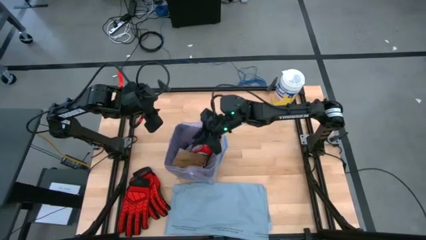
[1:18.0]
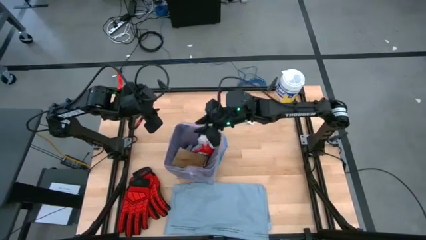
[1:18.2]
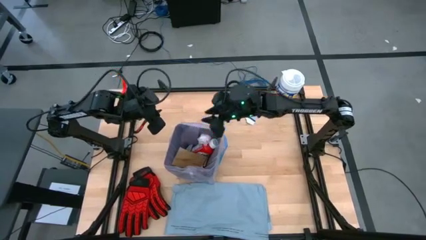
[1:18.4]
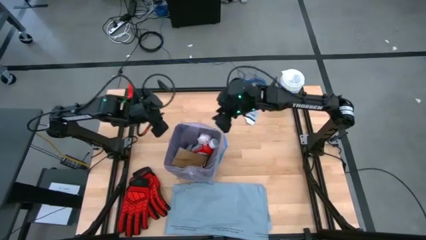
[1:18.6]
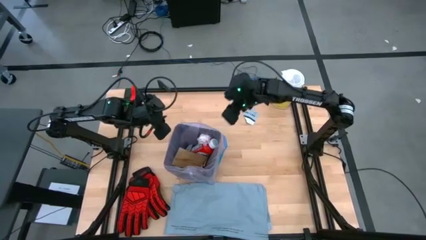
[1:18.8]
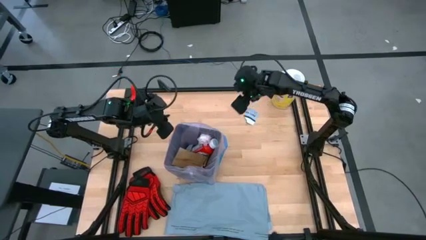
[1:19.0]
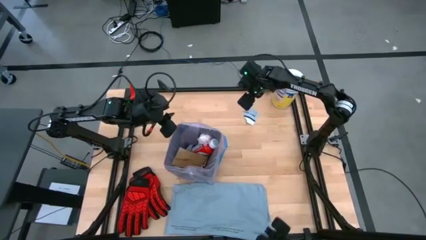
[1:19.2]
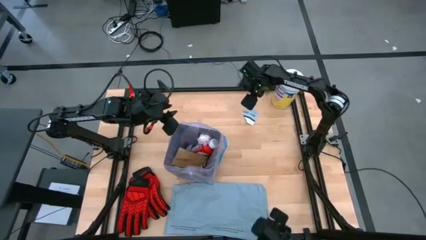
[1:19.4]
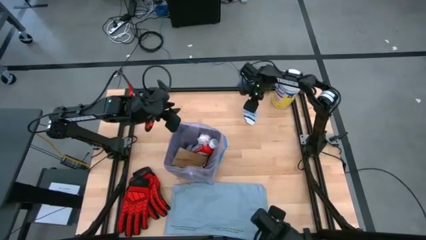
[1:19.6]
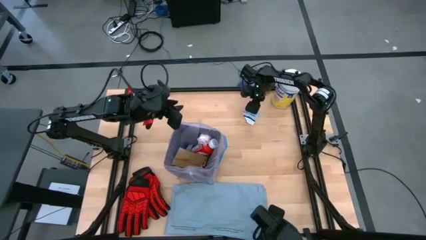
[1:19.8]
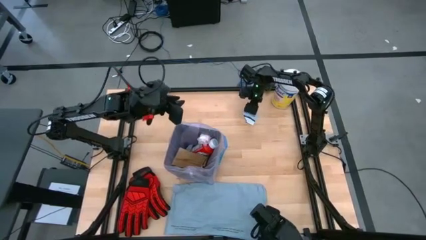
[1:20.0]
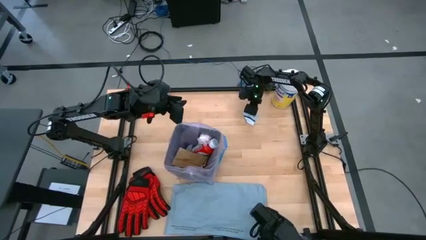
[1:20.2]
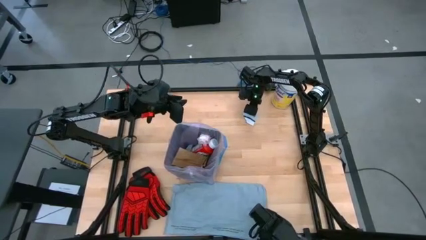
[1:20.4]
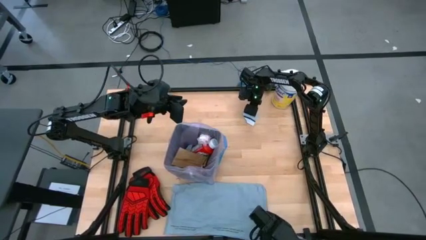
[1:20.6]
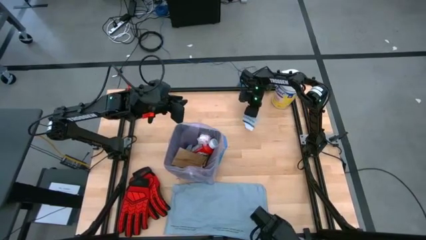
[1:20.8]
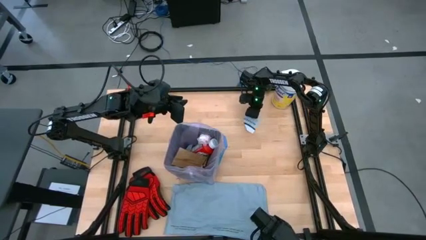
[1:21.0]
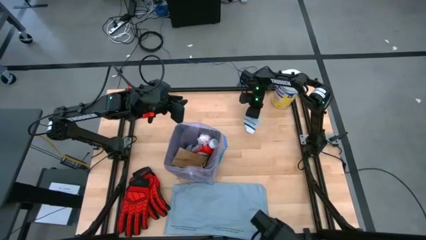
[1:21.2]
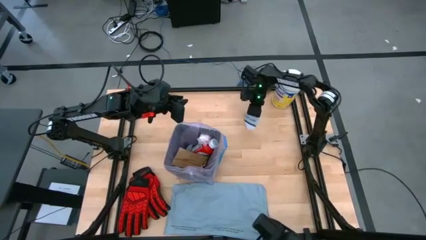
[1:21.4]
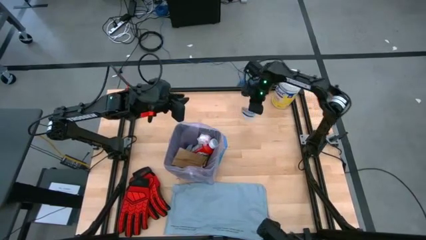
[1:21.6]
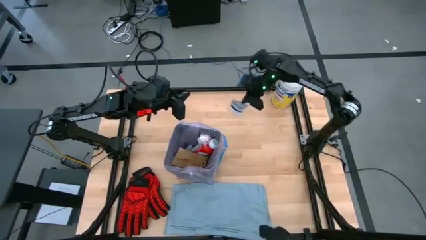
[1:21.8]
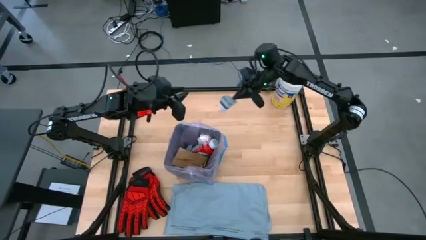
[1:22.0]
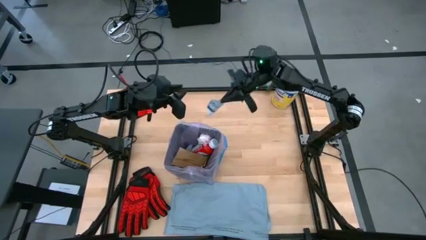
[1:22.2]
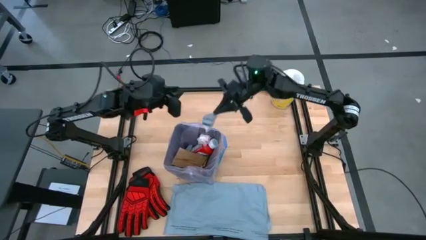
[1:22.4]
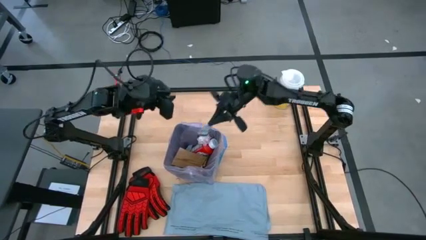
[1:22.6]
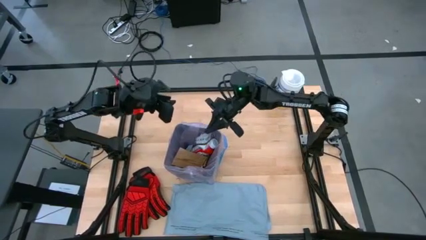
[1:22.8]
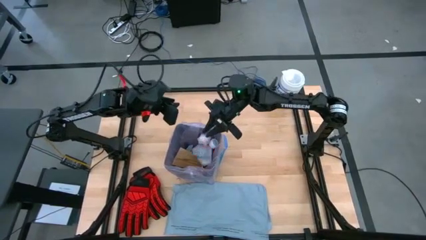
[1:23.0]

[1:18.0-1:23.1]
Task: place trash/remove bag and relplace
Put the white paper material into the trash bin

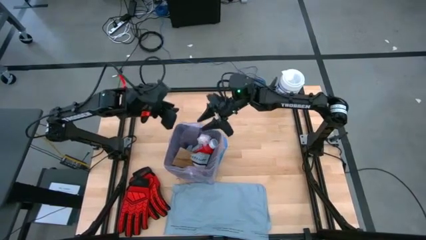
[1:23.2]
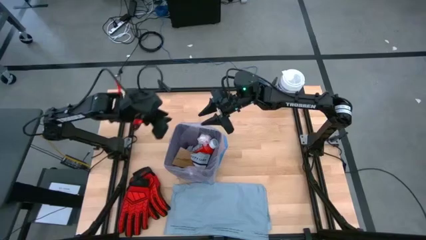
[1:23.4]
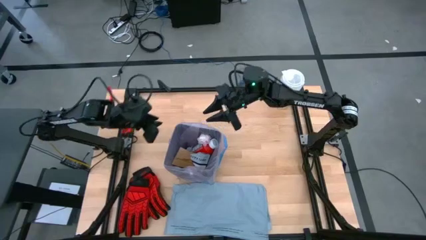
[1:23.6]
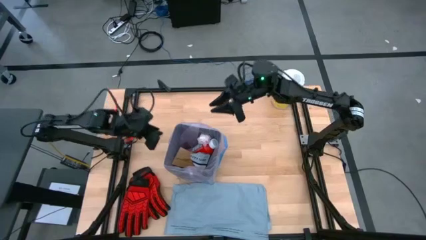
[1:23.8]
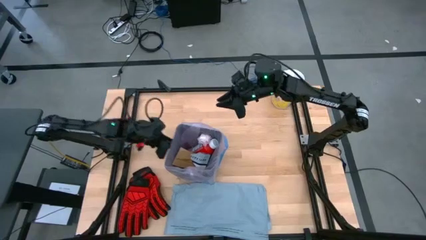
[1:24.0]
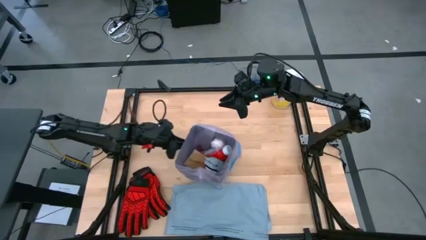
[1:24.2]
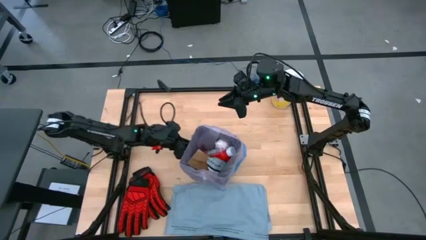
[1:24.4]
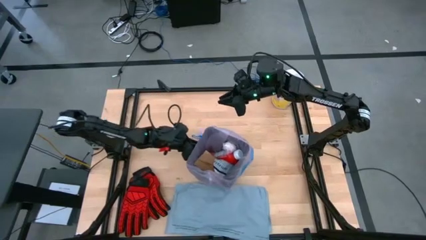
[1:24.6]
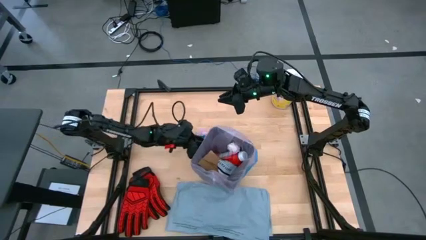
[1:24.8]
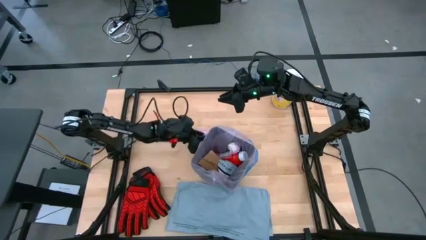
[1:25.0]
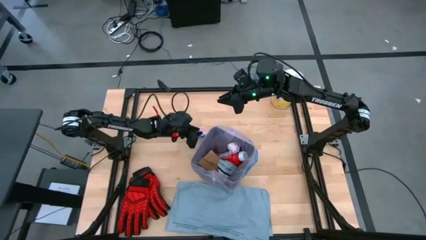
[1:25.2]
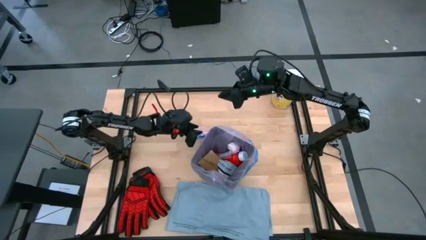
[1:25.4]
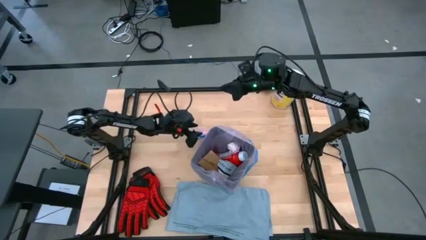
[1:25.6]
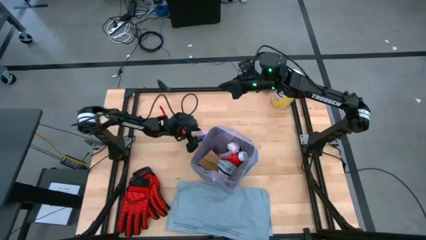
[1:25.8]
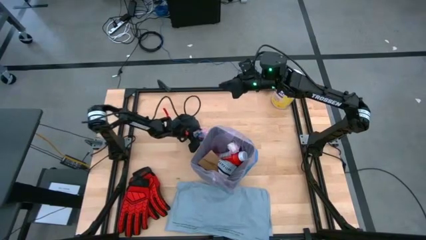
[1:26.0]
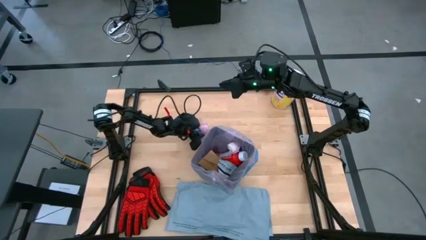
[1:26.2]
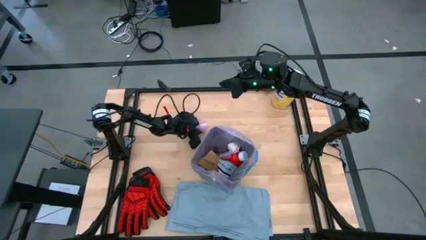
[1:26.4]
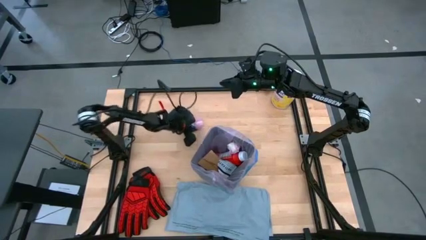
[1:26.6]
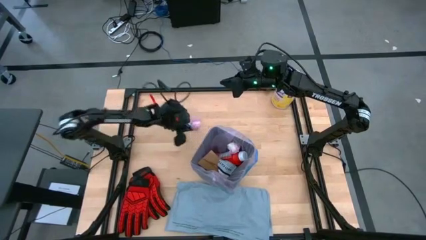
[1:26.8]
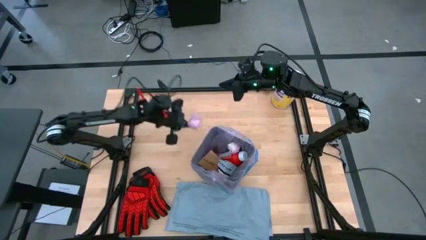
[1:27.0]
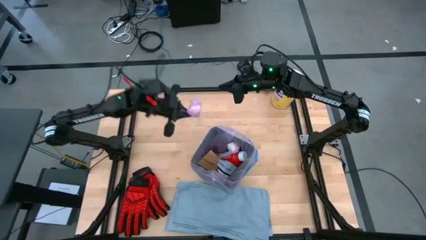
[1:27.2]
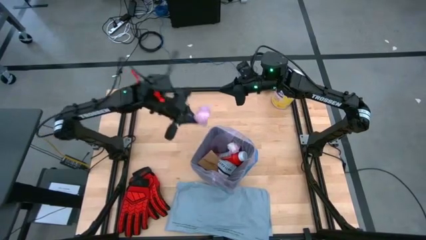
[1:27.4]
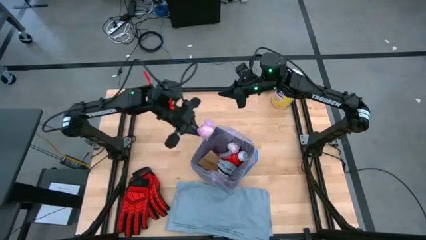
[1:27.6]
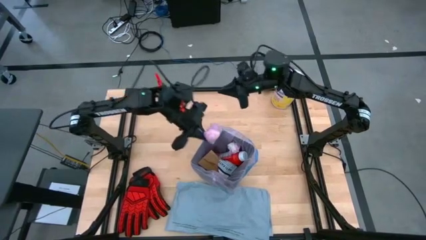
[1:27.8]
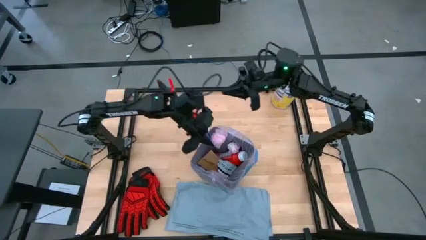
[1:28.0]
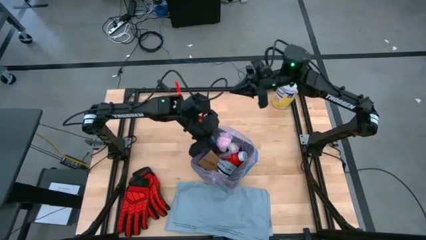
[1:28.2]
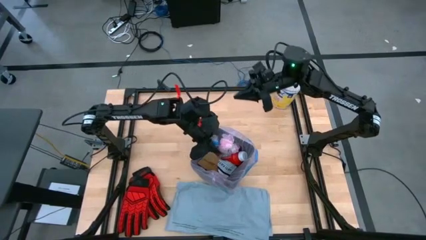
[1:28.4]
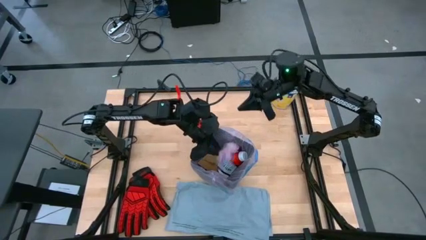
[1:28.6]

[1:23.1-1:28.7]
Put the pink plastic material into the trash bin

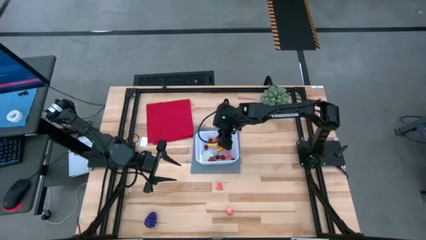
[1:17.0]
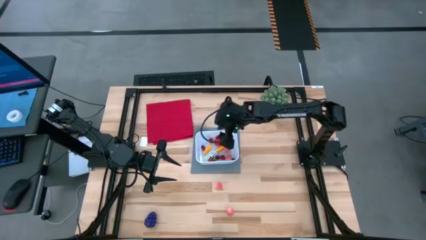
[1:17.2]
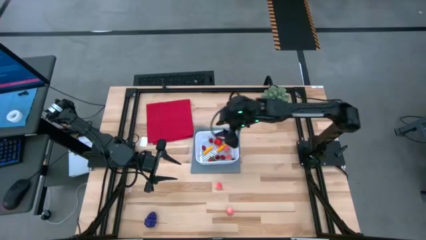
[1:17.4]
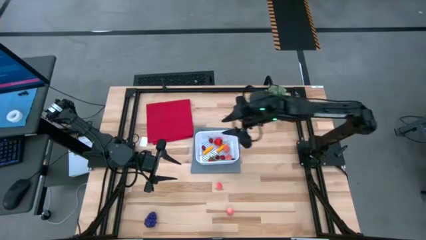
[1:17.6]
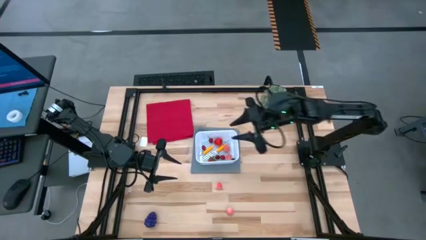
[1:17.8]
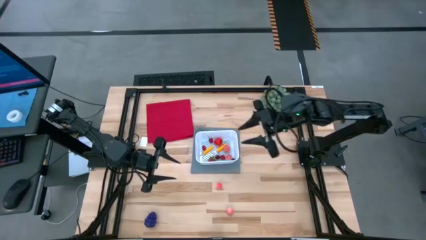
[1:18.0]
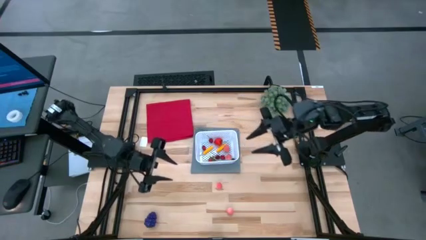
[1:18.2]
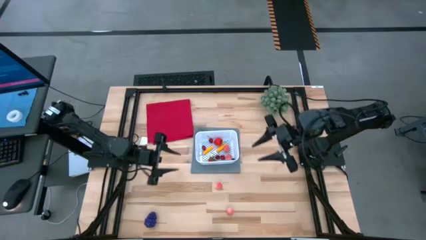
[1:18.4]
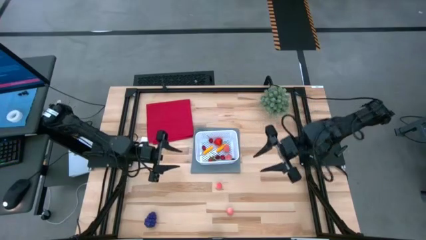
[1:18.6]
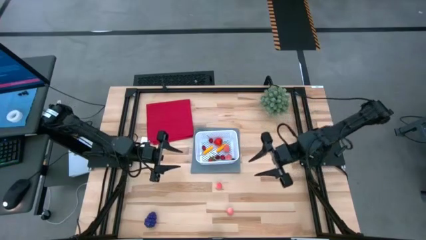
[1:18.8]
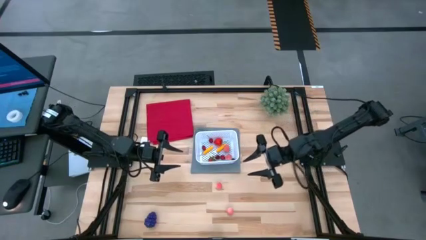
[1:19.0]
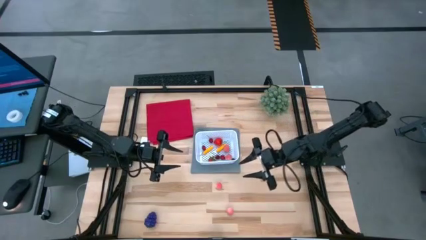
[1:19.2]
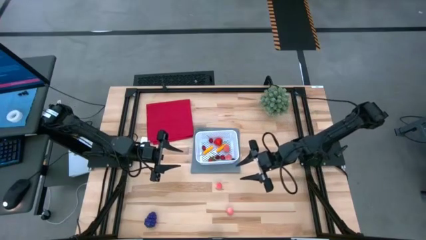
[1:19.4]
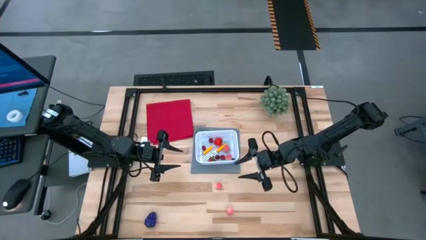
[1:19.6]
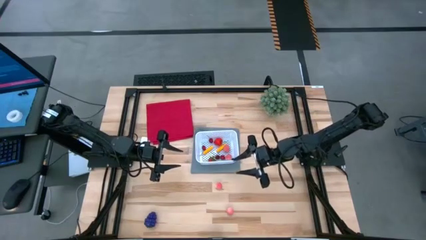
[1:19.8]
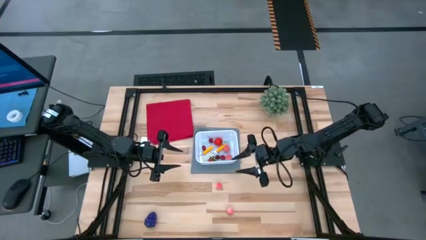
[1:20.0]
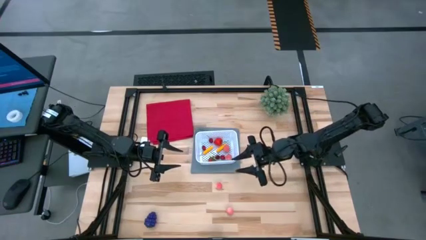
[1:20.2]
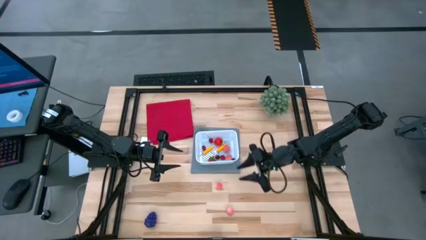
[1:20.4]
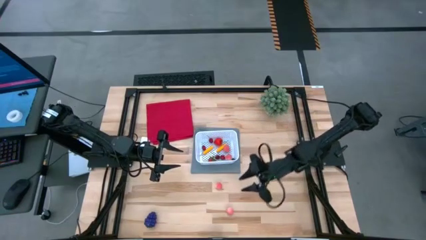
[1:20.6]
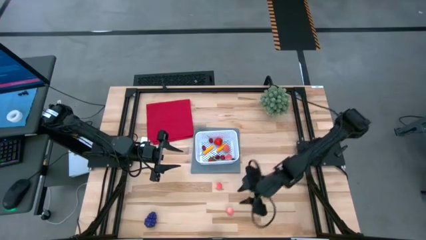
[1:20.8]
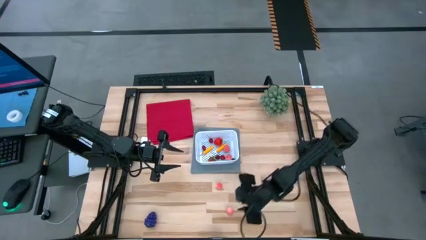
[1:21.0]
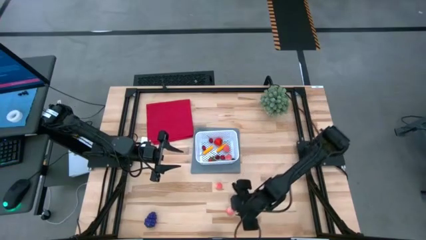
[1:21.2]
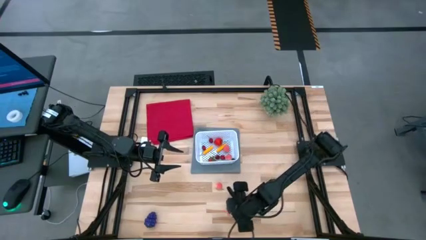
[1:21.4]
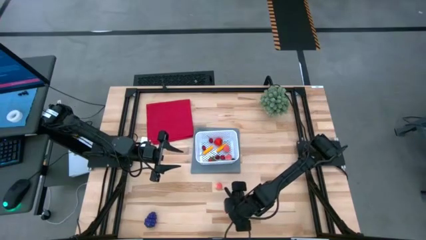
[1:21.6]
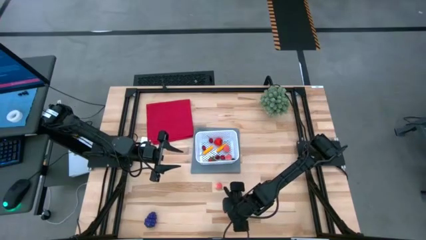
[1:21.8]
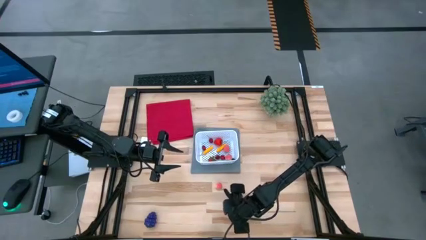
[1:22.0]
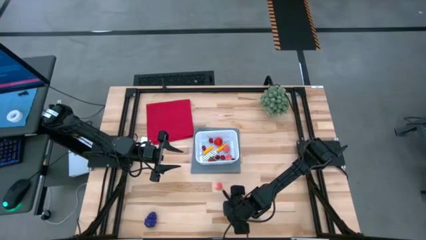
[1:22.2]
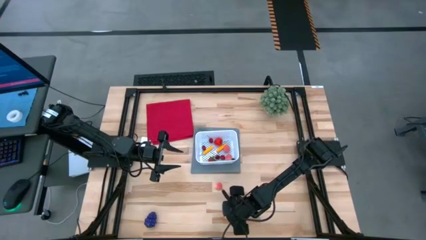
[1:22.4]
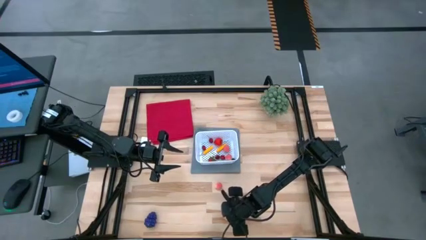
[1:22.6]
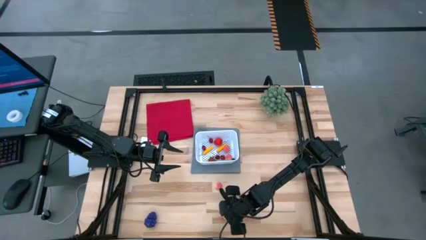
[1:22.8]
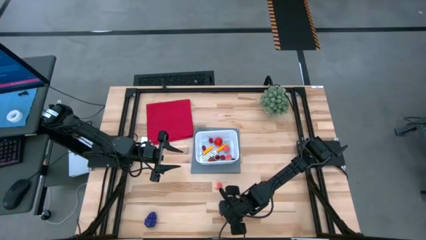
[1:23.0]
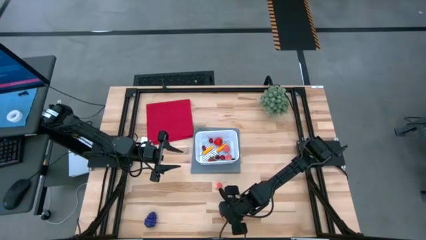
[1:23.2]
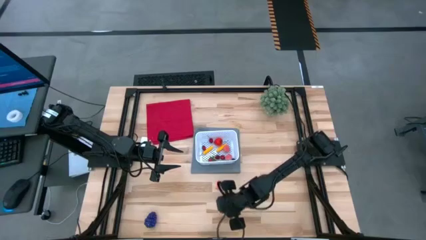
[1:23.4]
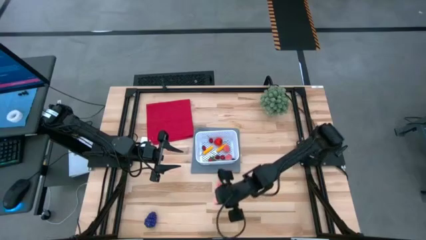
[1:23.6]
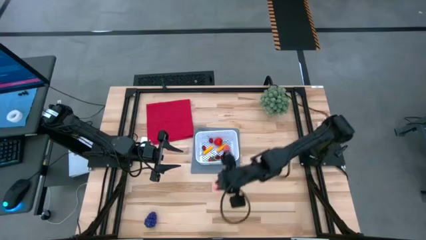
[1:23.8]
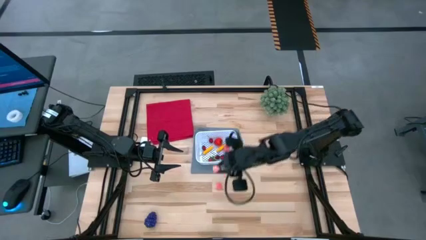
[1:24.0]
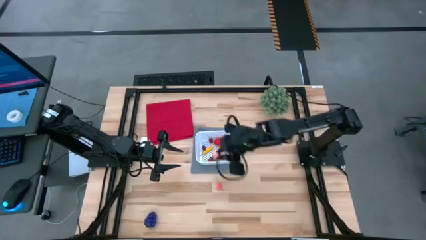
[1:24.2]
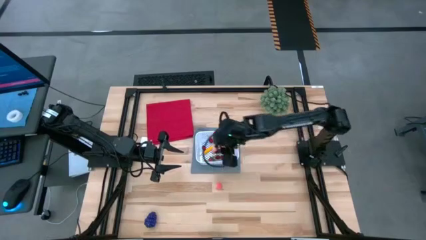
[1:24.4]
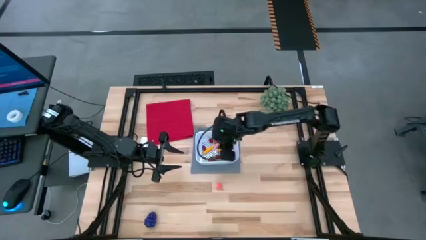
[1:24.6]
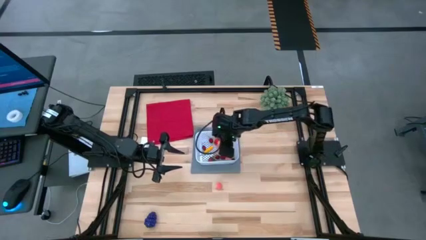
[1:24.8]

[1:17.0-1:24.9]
Task: Pick and placing Produce into tupperware
Put the bottom peach into the white basket
